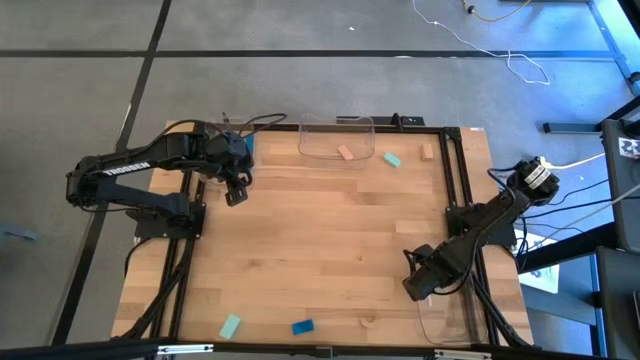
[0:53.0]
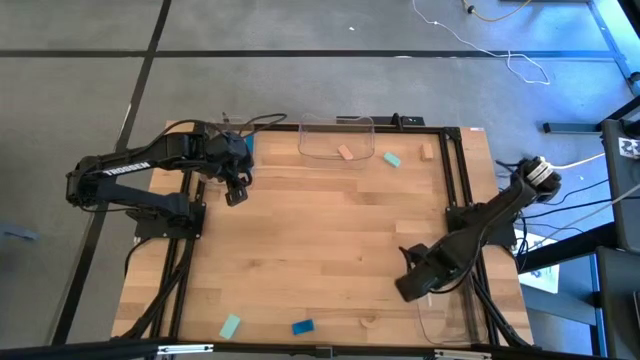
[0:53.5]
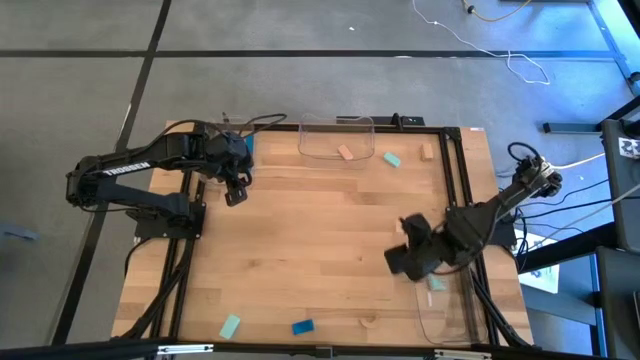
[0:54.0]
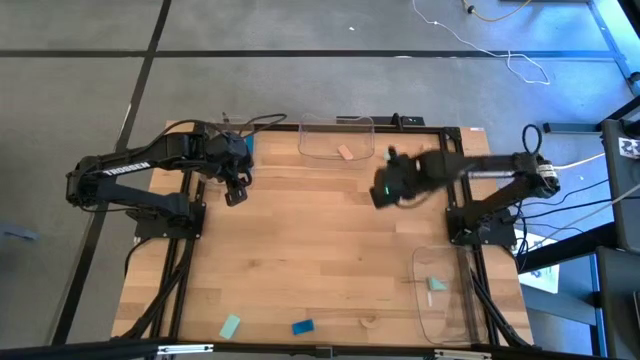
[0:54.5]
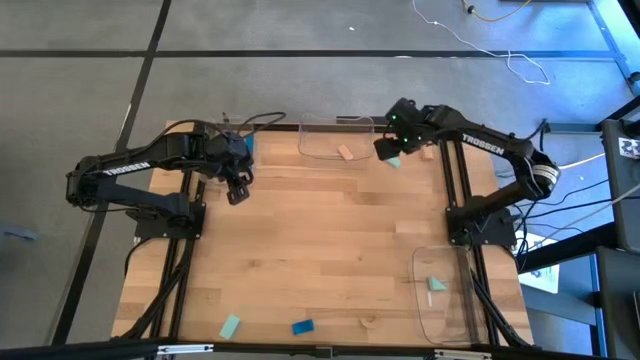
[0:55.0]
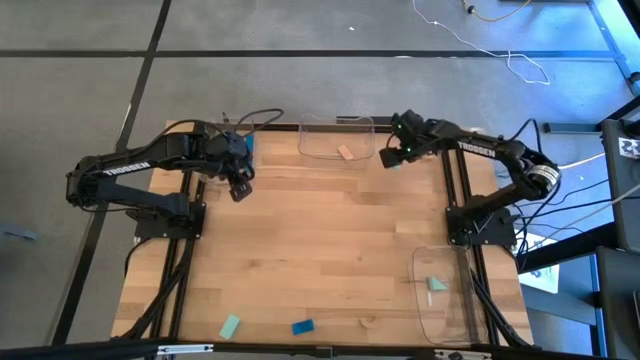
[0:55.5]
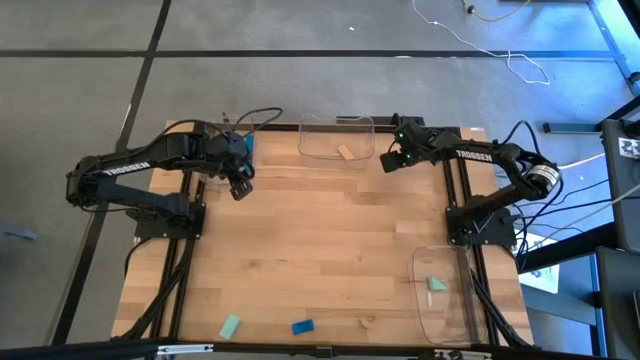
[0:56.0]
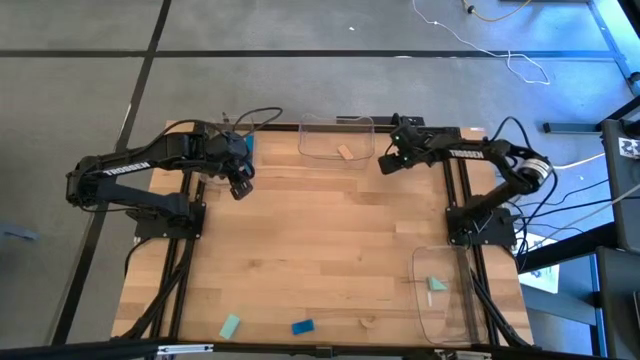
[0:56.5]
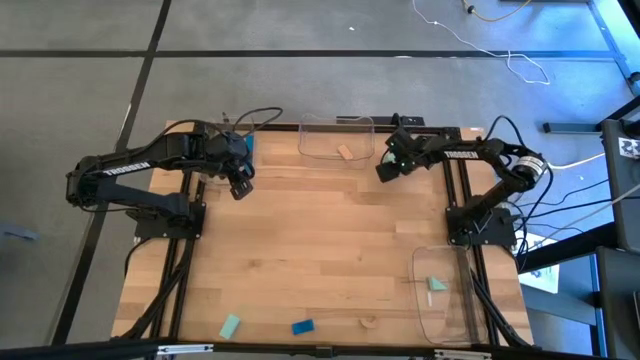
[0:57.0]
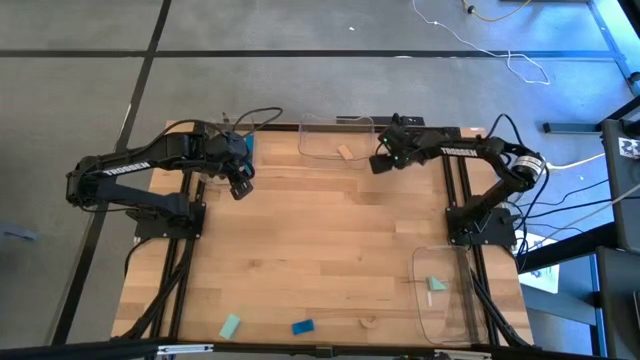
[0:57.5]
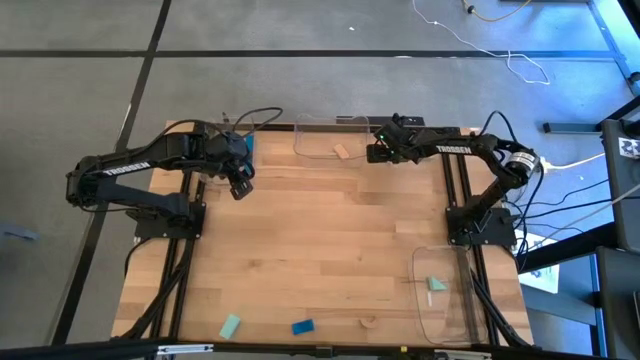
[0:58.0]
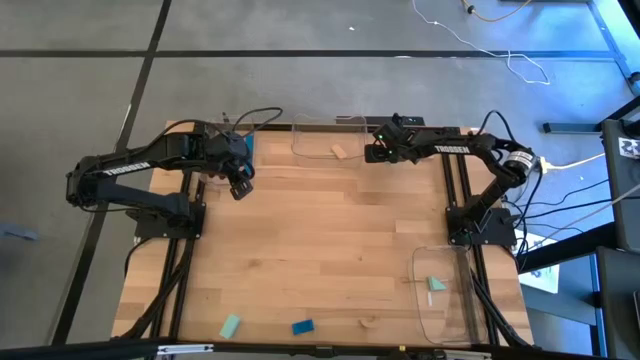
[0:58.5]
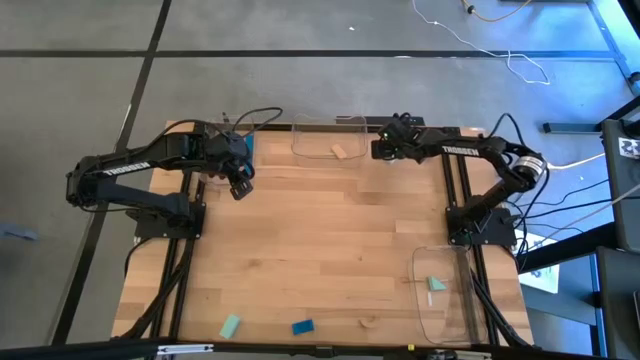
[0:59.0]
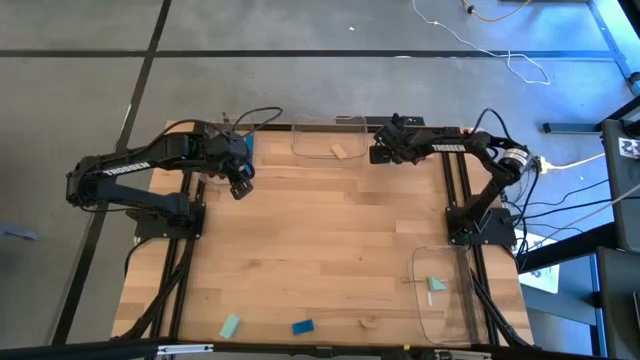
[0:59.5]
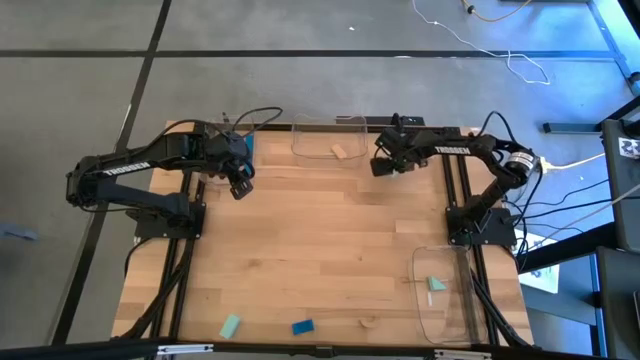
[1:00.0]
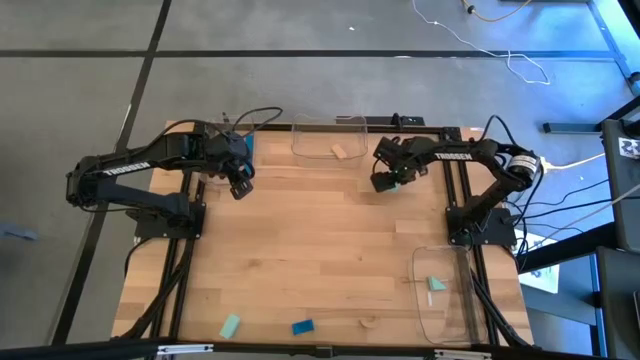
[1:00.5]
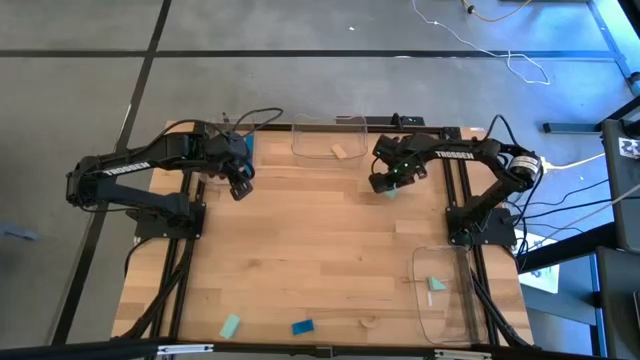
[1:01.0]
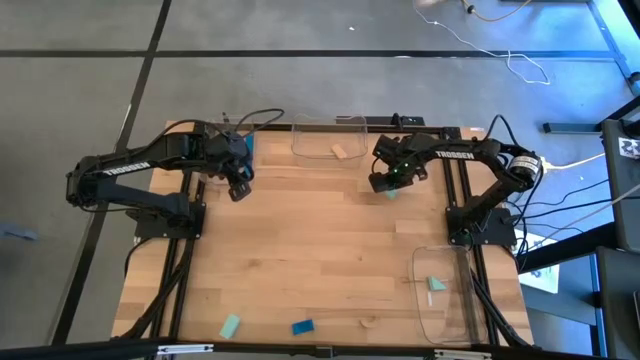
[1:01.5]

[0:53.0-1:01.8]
Task: Sort & place blocks by color
Put the top light blue block into the bottom transparent bin

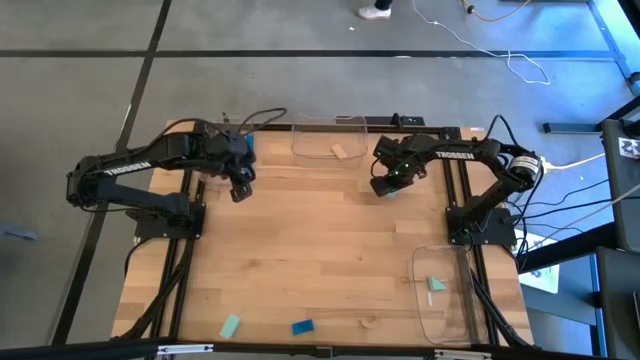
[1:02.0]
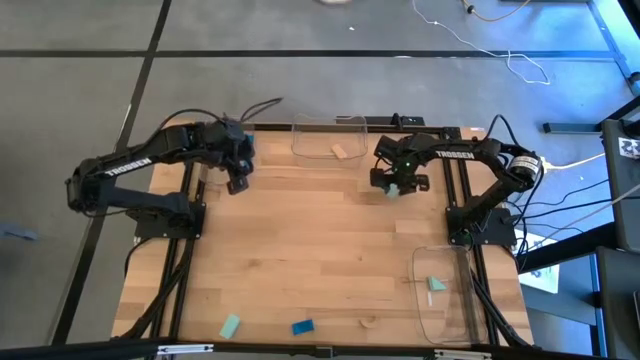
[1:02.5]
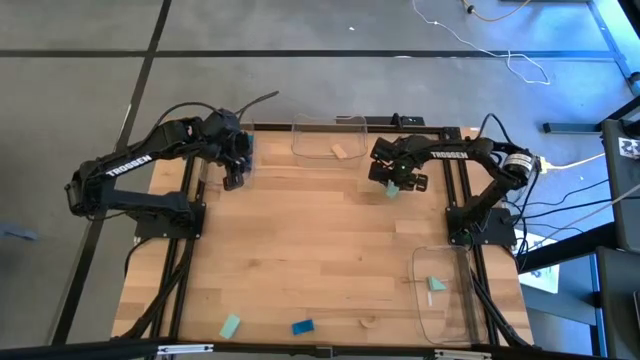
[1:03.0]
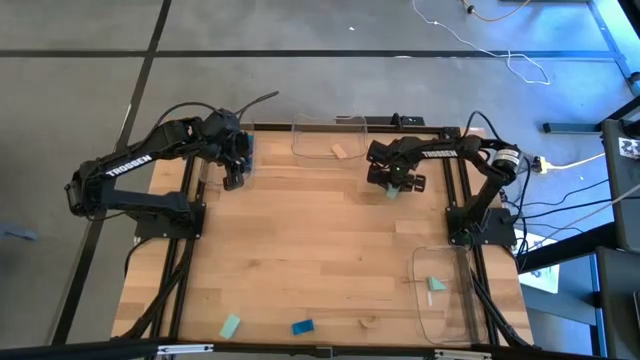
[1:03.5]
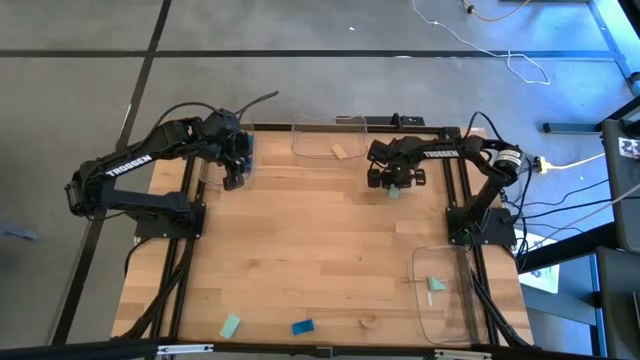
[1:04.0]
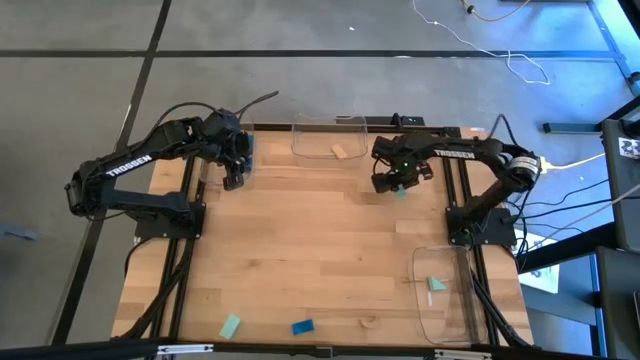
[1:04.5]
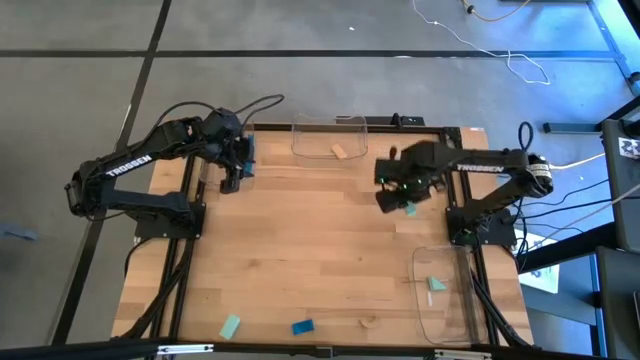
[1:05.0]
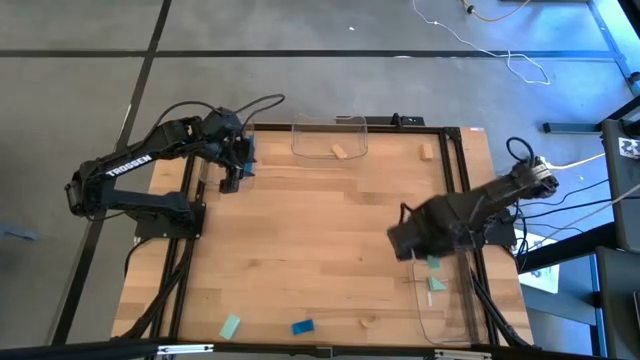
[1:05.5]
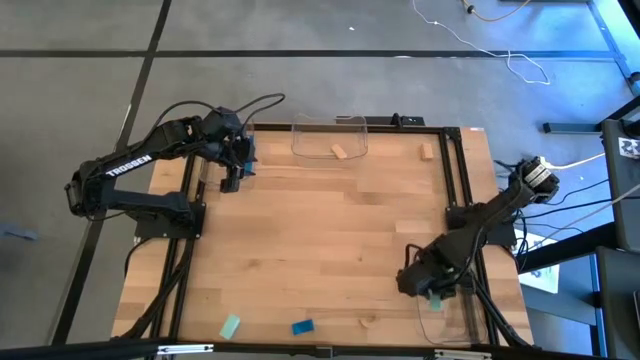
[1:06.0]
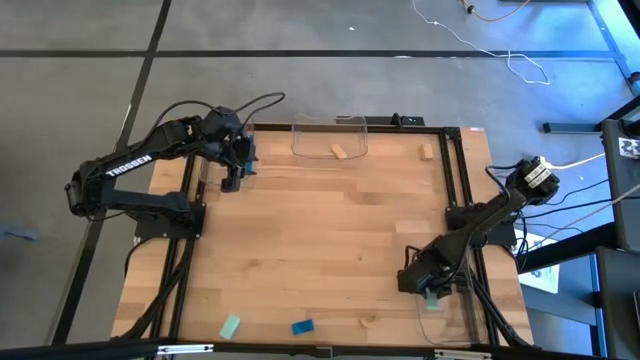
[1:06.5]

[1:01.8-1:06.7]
Put the top light blue block into the bottom transparent bin

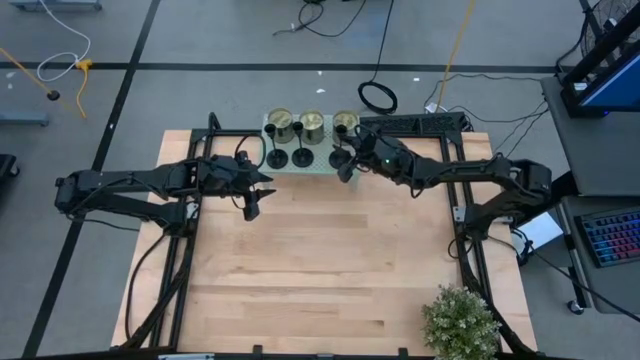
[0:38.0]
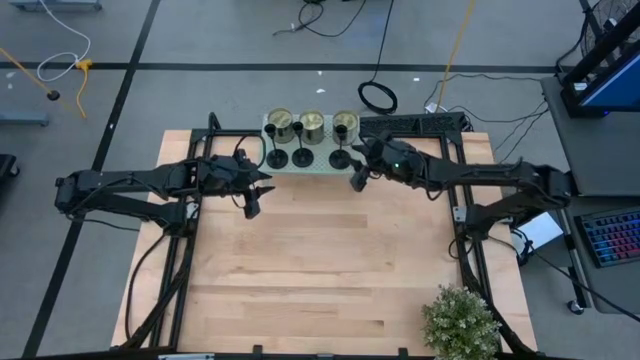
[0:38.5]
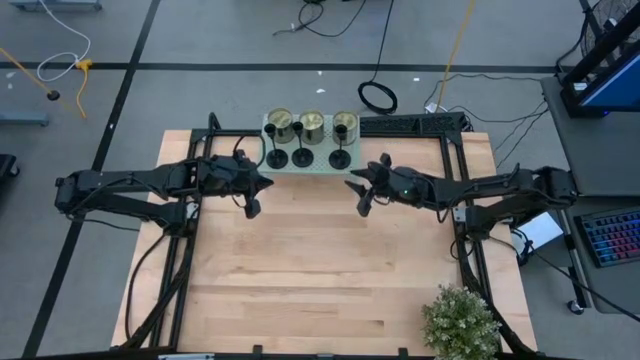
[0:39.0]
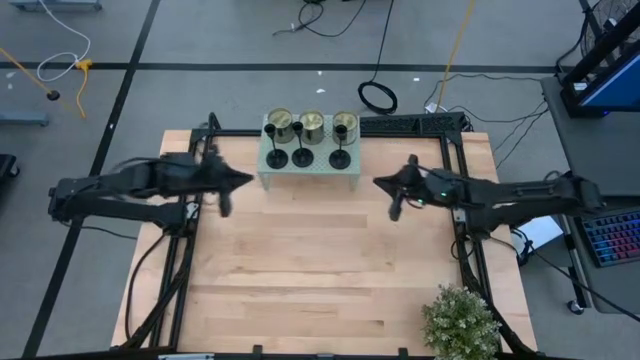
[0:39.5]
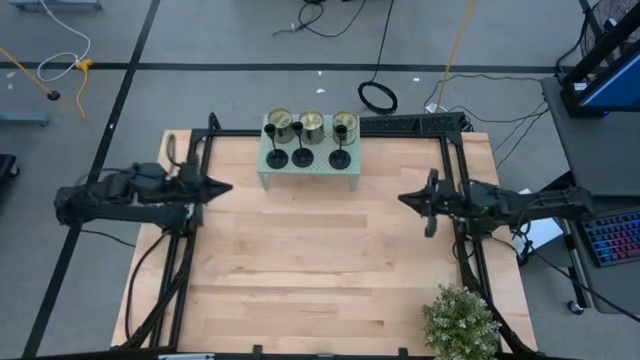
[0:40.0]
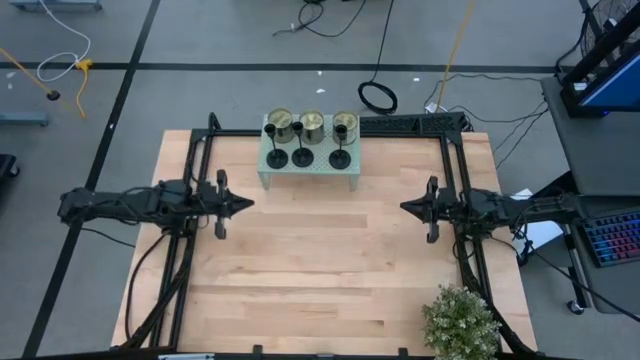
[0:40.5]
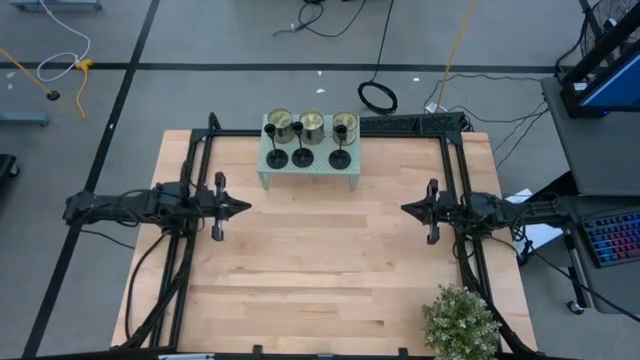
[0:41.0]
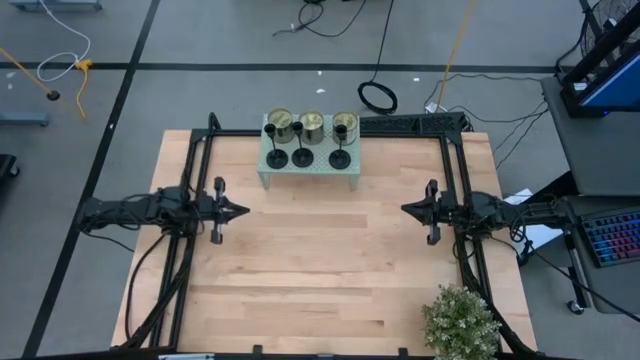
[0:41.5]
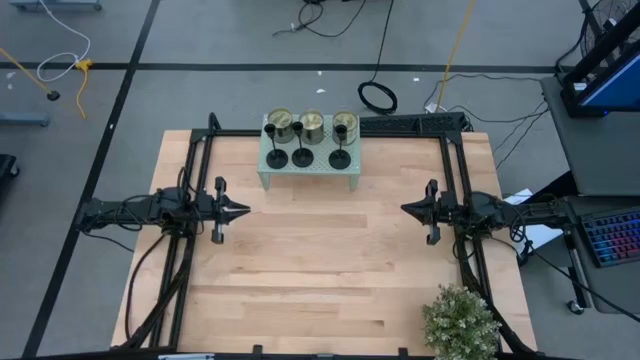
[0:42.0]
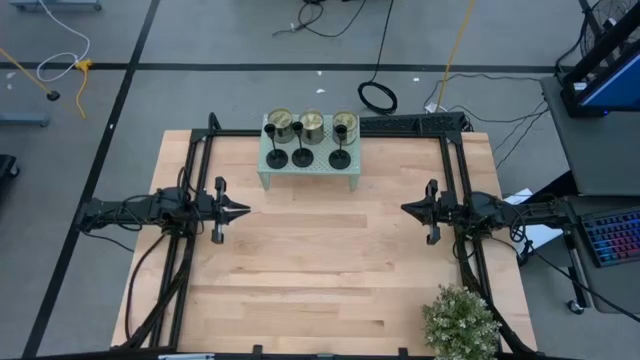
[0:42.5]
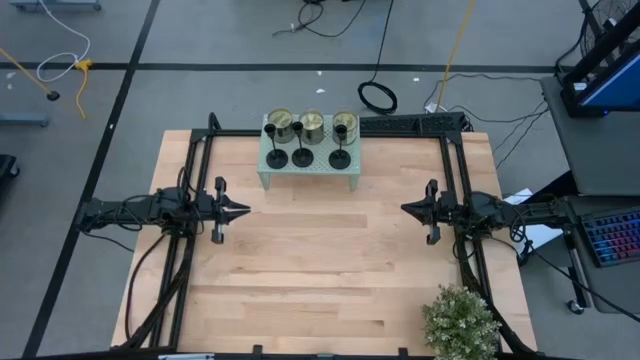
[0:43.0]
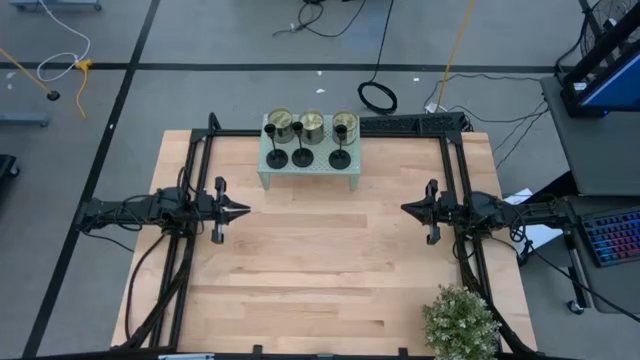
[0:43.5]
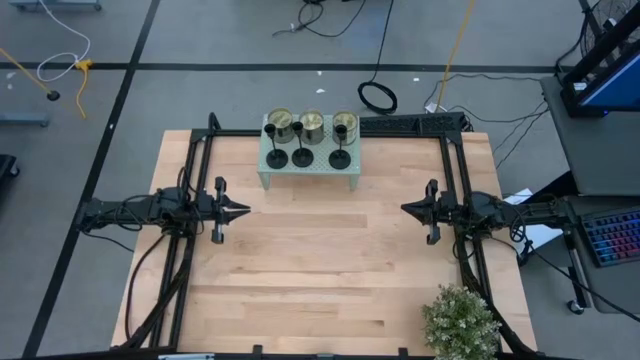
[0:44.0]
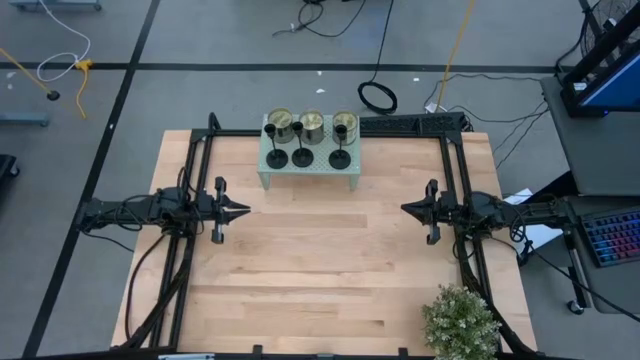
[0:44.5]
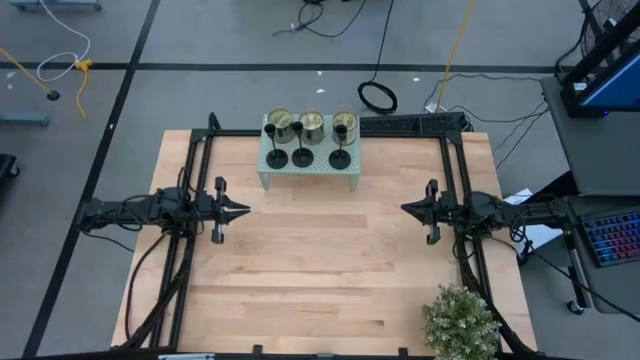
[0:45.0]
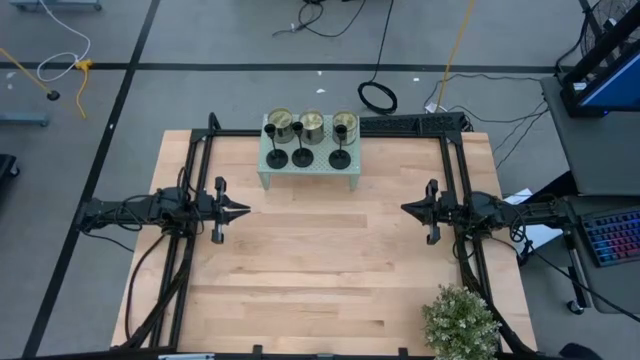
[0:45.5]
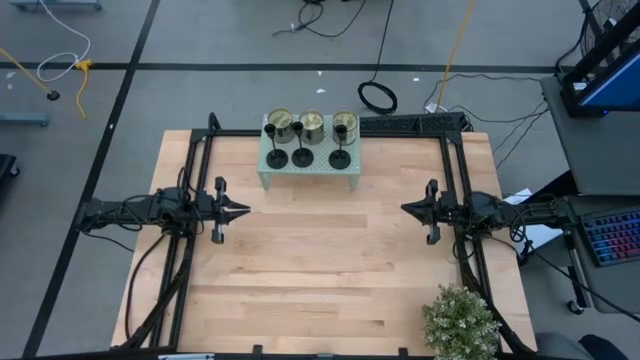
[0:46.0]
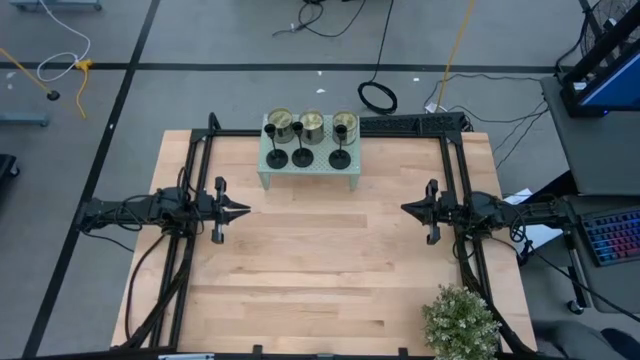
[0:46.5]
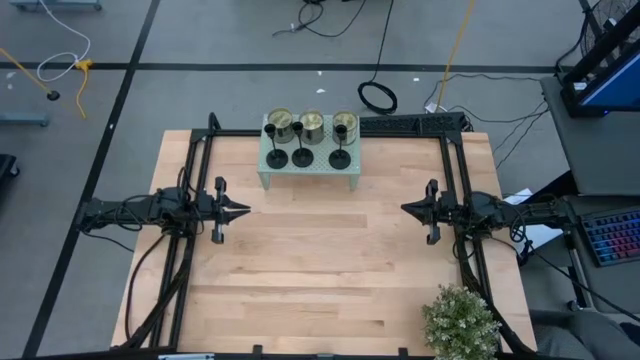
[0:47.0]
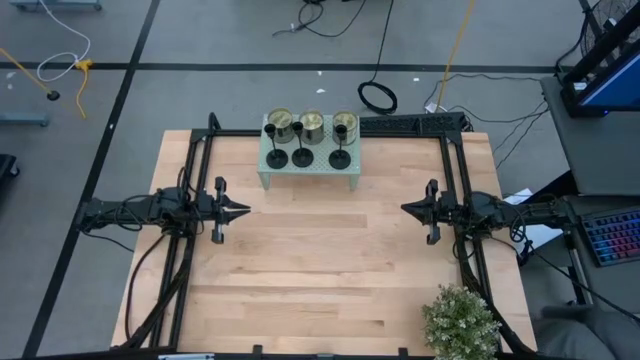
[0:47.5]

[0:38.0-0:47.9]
Task: Pick & Place candle stick holders
Return to Home Position
